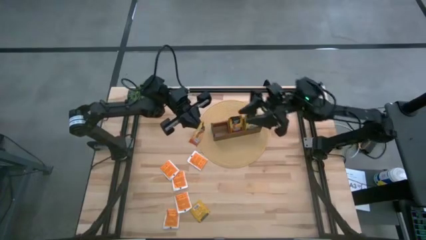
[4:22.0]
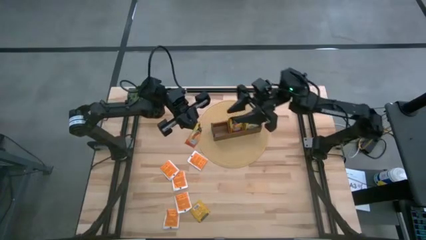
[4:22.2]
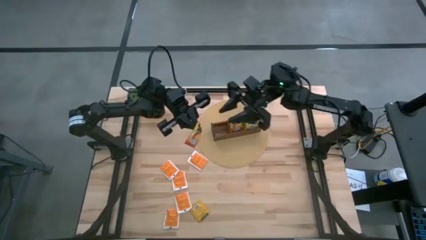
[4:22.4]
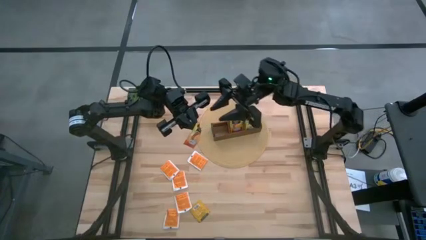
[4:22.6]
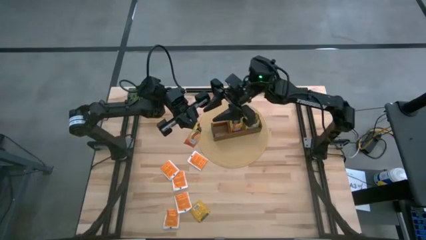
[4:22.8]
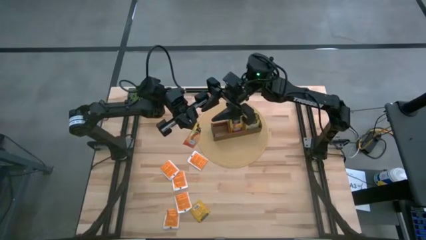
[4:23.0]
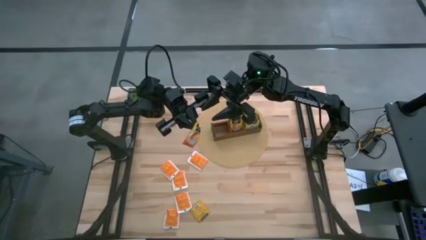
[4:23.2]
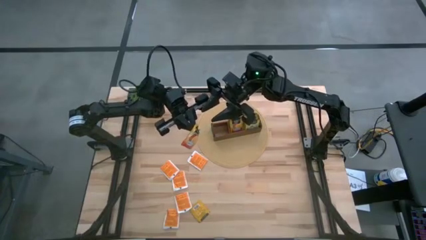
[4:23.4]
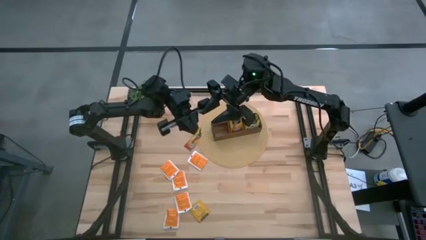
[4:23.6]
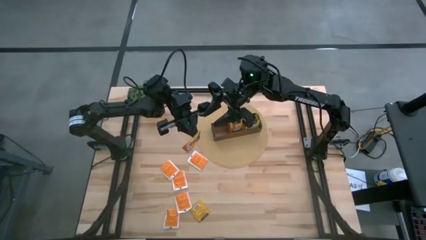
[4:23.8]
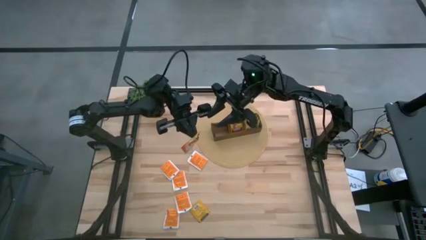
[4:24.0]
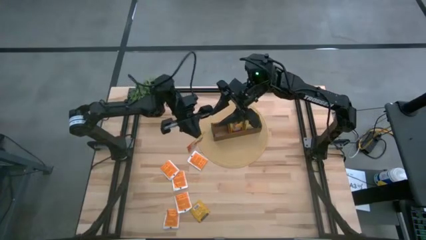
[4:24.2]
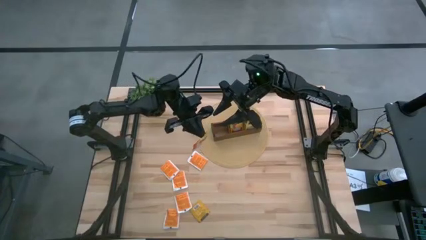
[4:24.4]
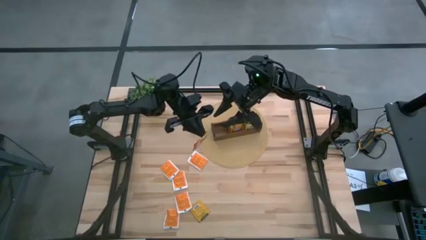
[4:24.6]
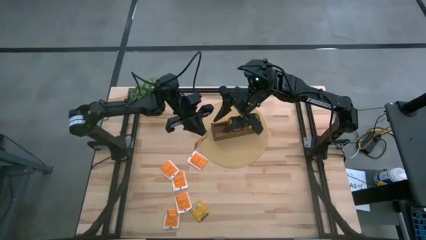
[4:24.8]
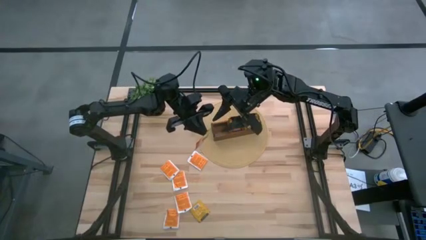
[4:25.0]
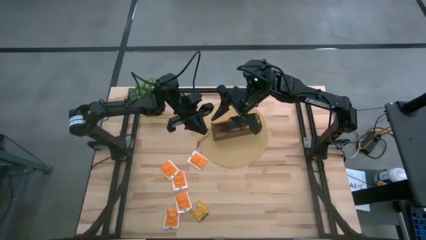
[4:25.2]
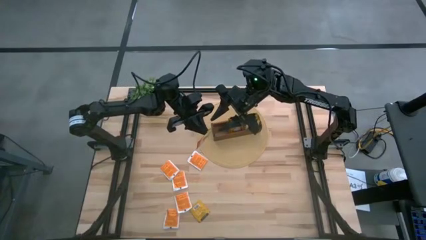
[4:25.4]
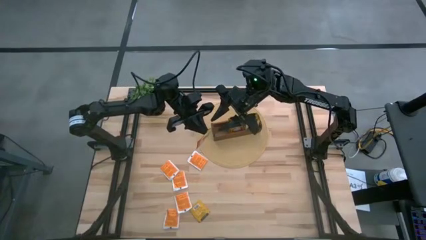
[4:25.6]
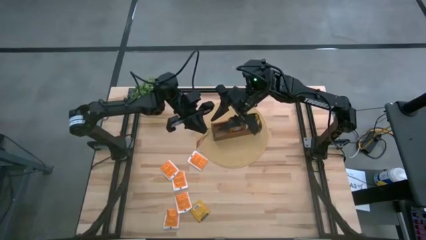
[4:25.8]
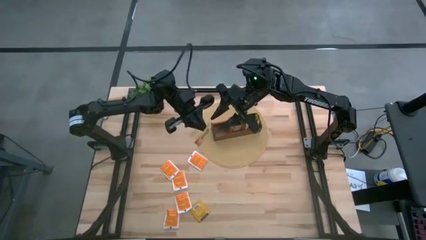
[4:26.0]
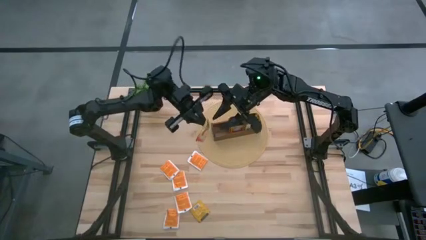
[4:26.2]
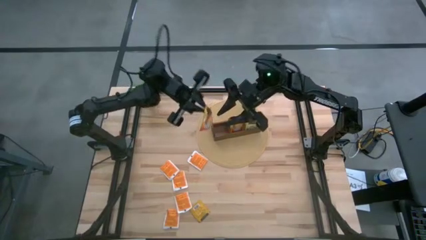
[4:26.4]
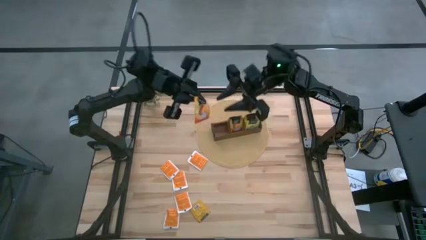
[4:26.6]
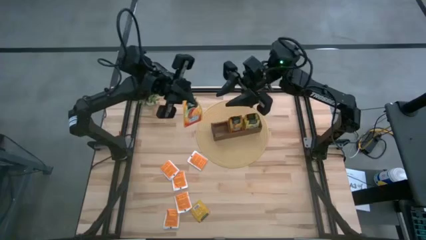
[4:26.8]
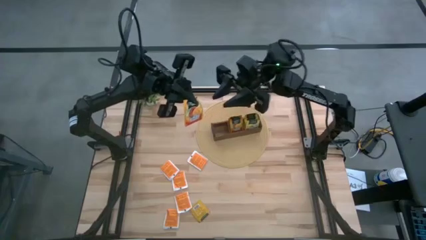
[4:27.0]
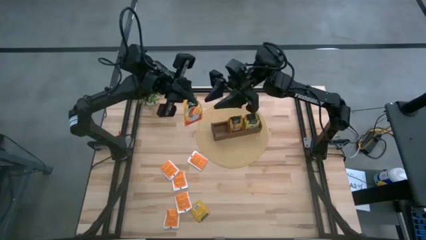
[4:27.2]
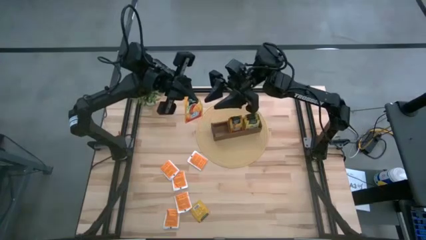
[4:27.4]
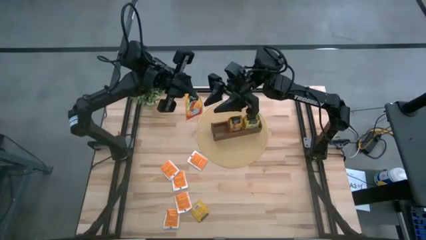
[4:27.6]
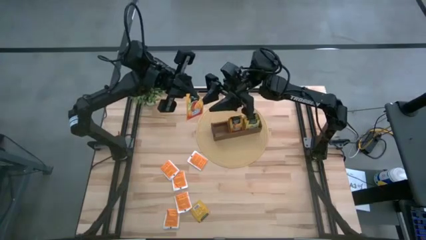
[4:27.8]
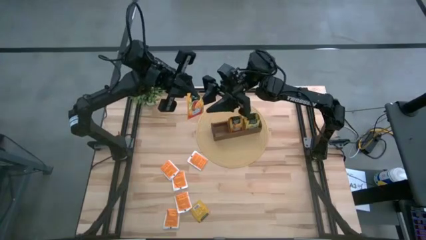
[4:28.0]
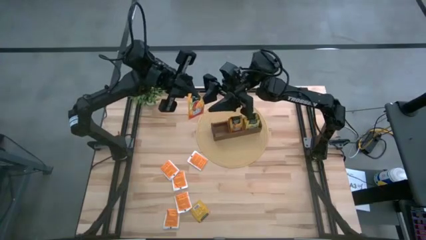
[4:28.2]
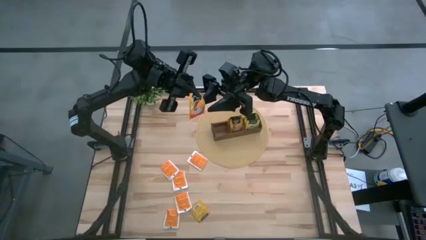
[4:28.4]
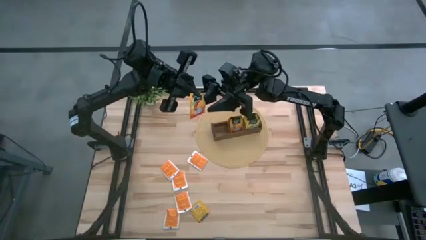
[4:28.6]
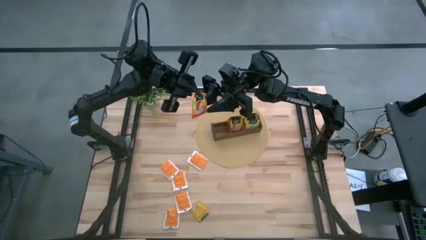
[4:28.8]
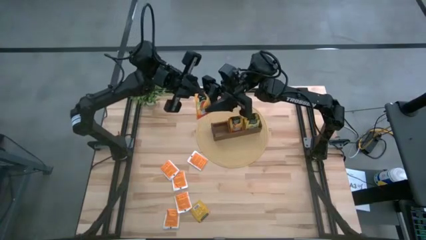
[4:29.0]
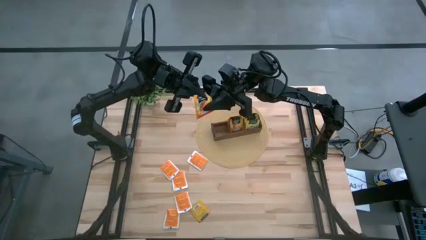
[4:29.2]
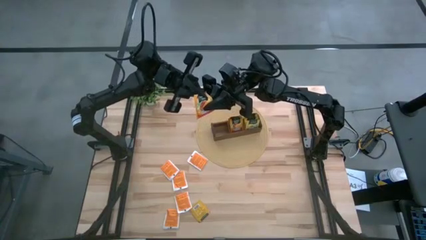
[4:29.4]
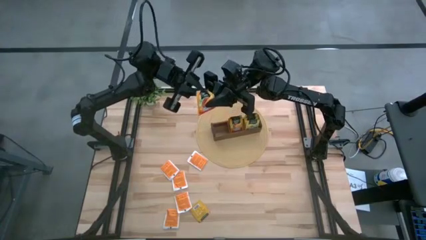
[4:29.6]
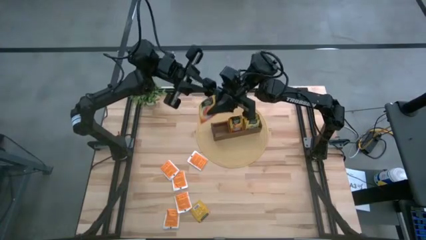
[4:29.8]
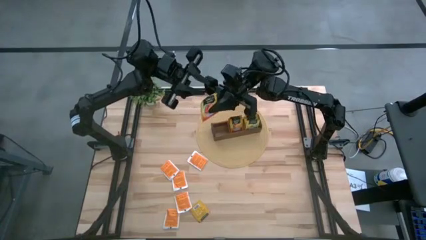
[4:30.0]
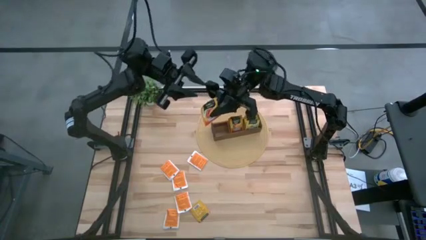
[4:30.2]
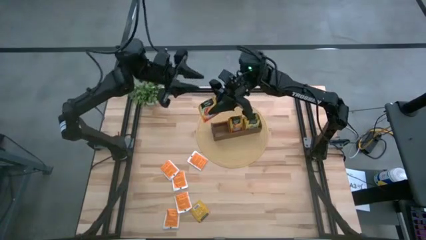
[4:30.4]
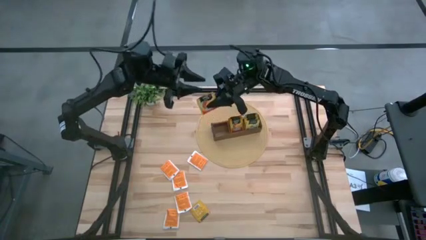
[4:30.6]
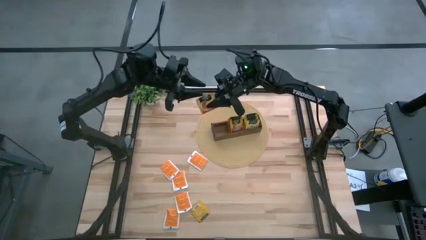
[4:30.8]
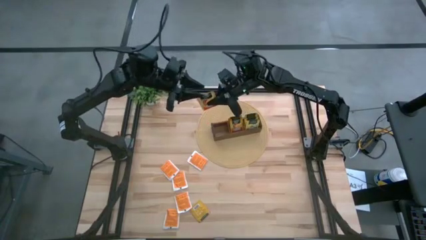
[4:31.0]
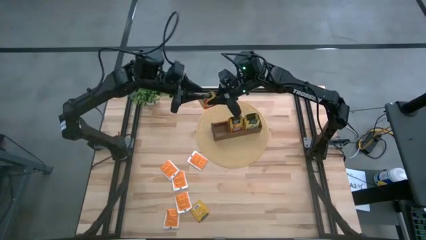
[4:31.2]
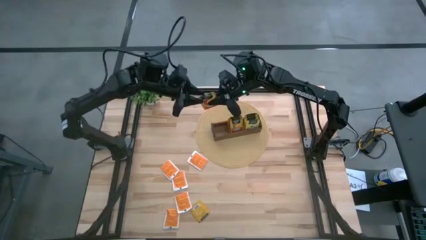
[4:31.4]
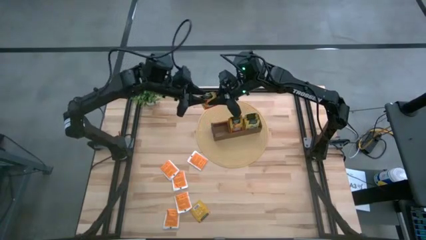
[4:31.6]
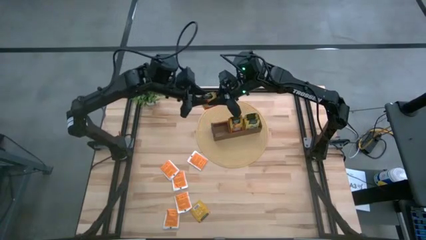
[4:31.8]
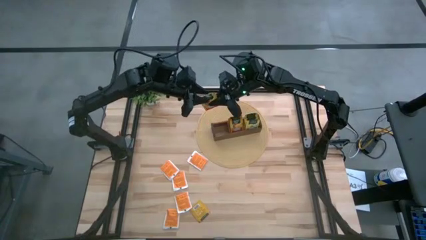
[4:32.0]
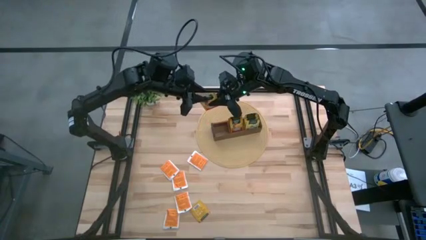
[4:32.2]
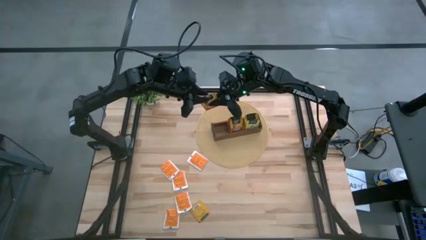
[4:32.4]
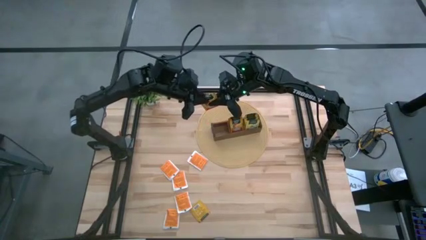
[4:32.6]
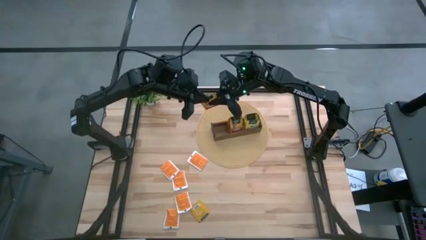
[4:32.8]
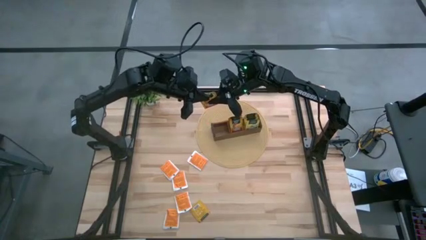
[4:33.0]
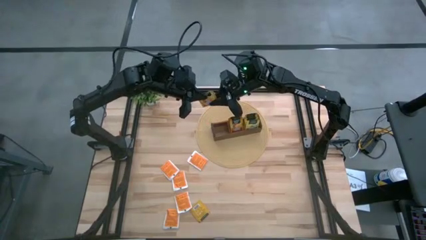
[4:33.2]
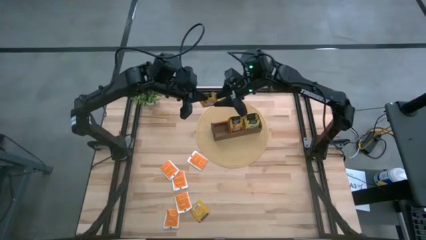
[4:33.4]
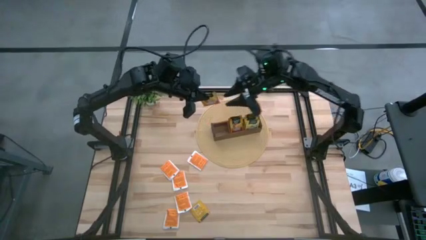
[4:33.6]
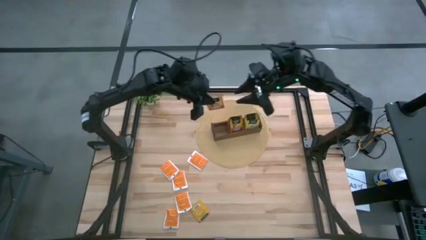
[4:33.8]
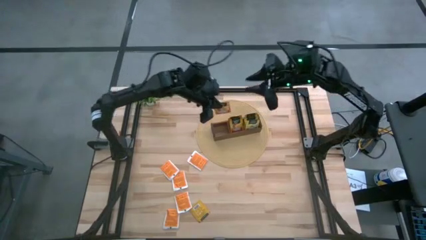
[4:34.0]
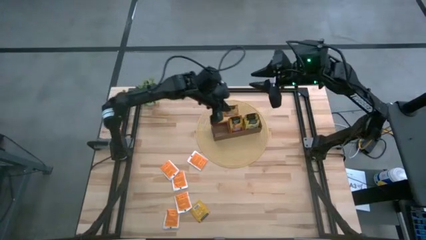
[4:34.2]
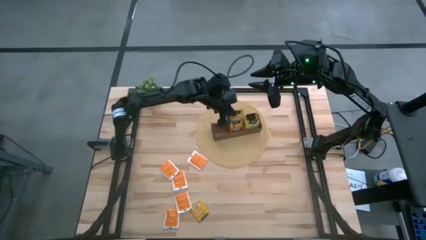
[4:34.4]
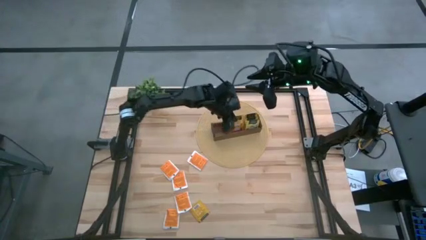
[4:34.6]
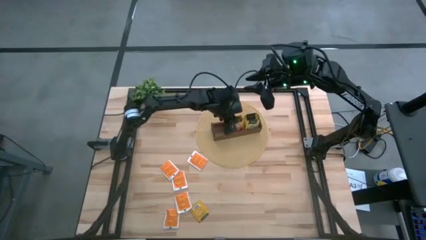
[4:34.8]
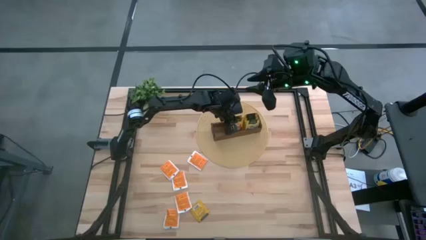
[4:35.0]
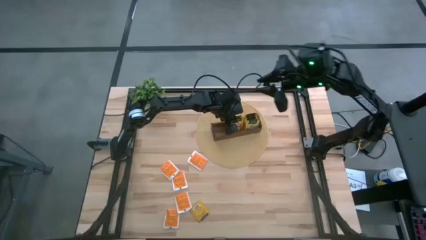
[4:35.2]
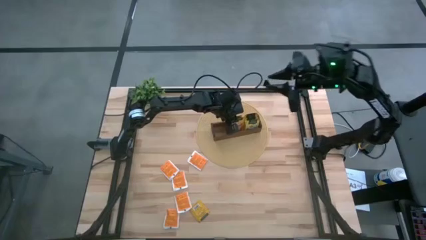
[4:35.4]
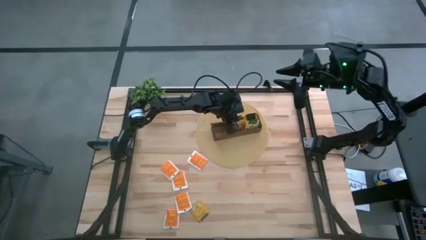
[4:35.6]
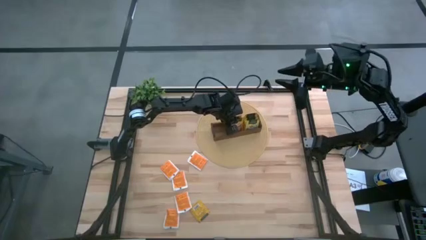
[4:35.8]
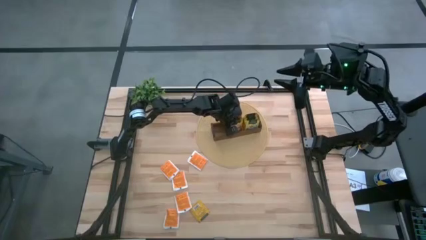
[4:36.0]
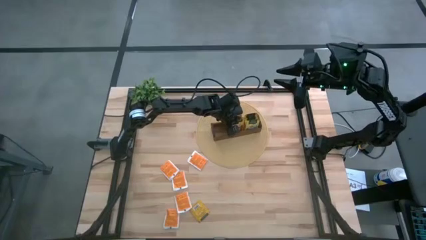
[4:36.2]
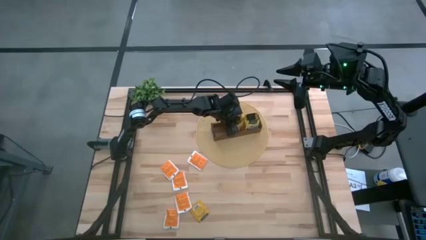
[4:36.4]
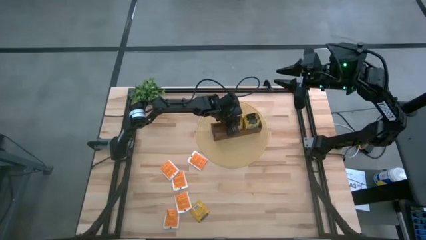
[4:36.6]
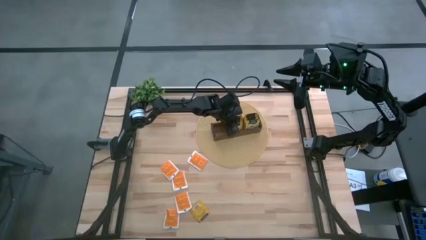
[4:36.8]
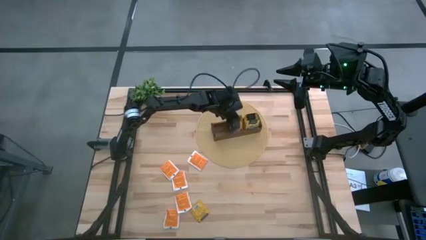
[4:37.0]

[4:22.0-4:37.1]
Task: Pick & Place Tea
Put the top orange tea bag into the middle section of the wooden organizer
